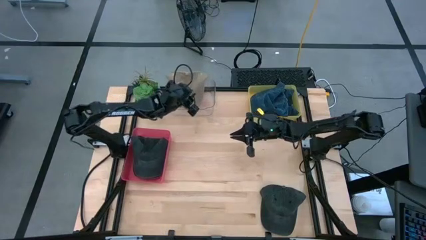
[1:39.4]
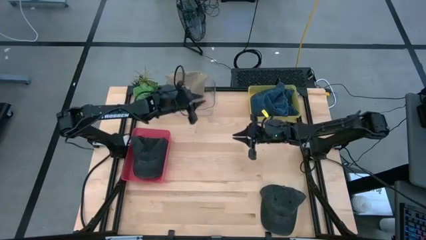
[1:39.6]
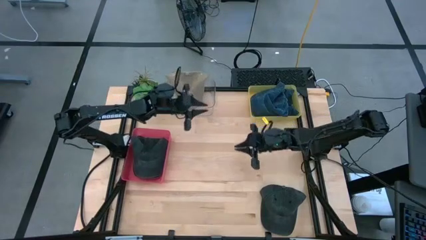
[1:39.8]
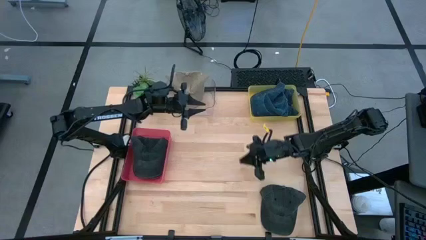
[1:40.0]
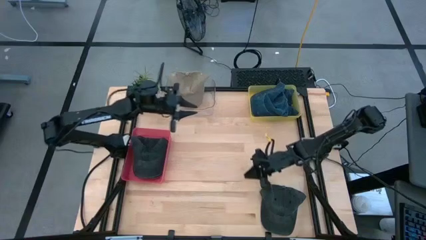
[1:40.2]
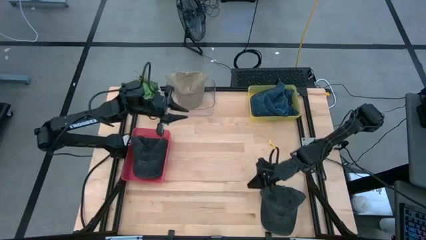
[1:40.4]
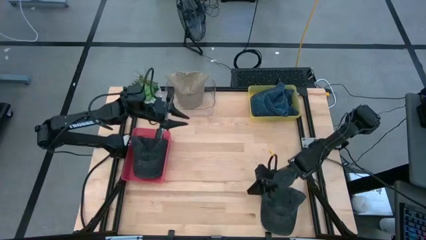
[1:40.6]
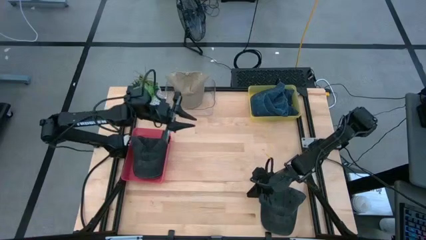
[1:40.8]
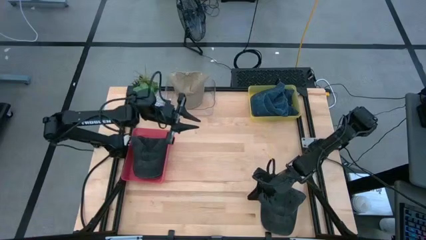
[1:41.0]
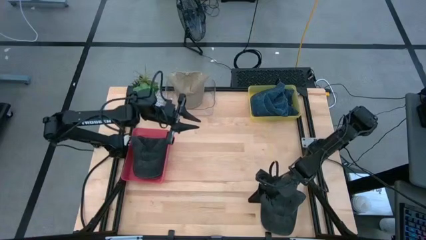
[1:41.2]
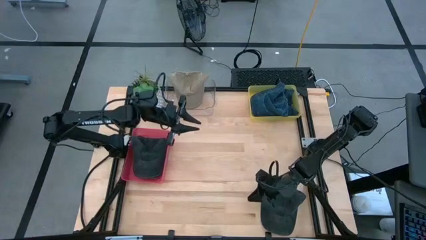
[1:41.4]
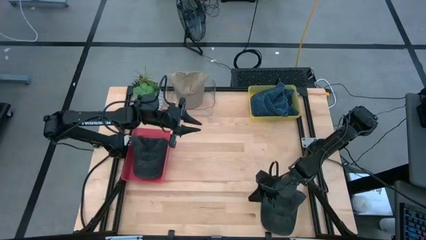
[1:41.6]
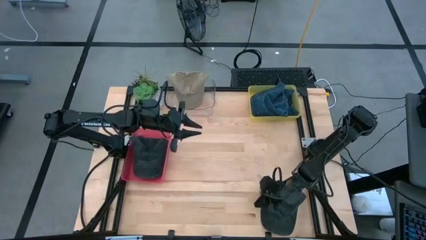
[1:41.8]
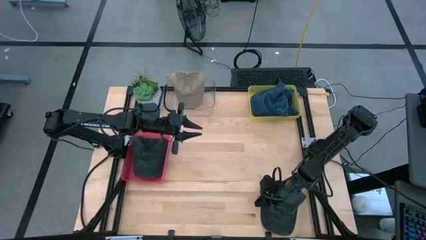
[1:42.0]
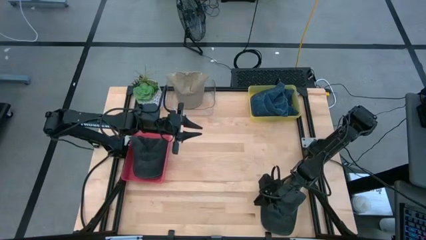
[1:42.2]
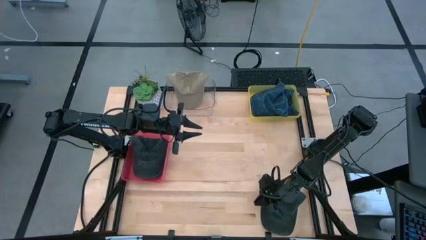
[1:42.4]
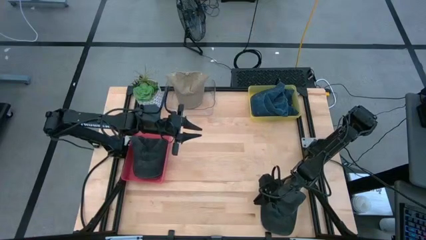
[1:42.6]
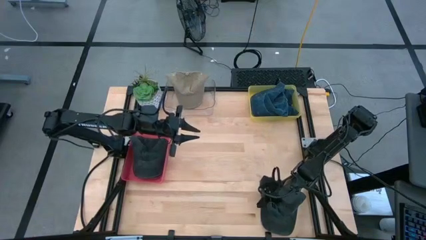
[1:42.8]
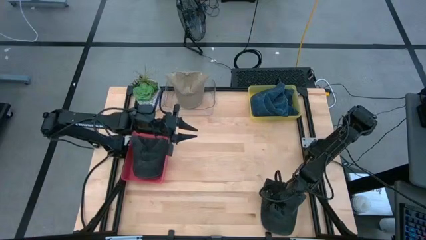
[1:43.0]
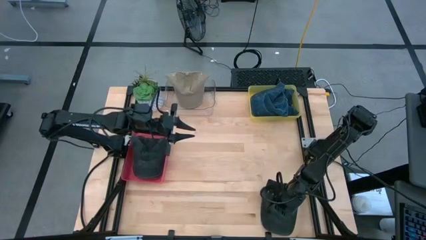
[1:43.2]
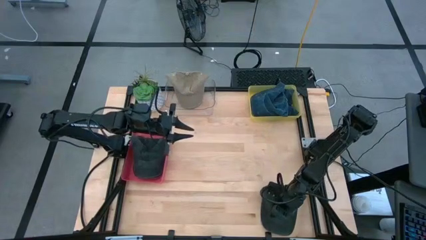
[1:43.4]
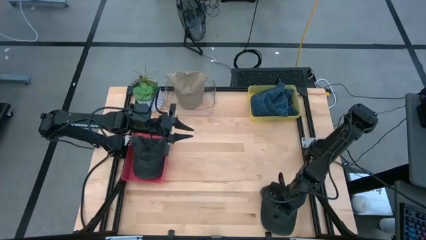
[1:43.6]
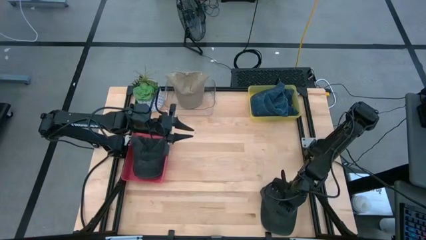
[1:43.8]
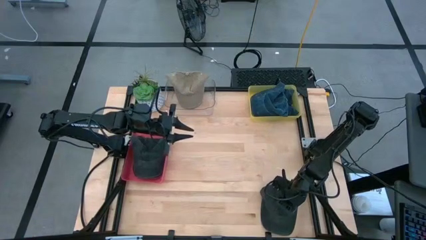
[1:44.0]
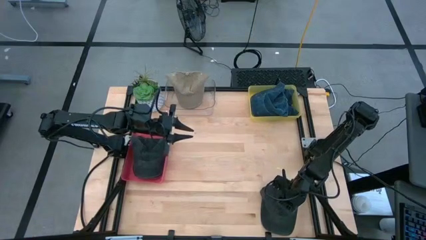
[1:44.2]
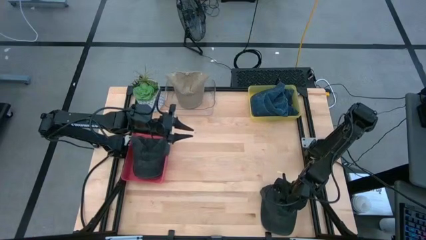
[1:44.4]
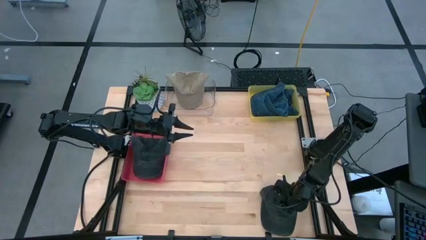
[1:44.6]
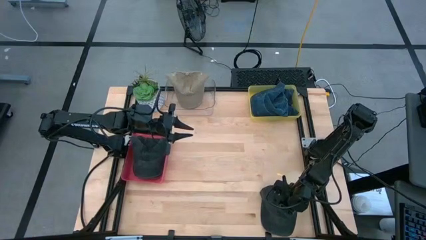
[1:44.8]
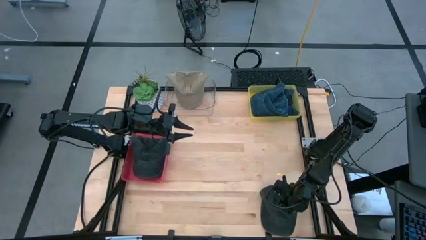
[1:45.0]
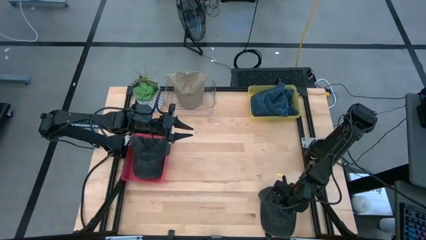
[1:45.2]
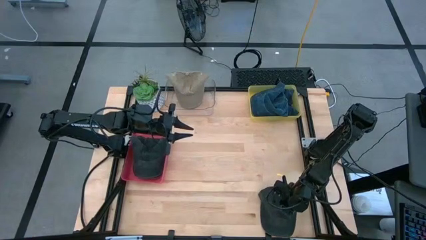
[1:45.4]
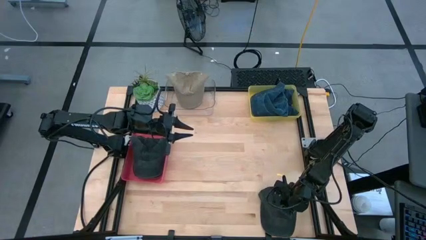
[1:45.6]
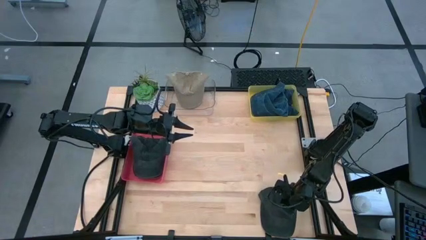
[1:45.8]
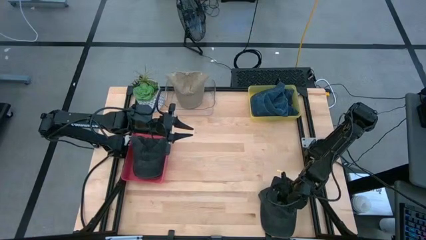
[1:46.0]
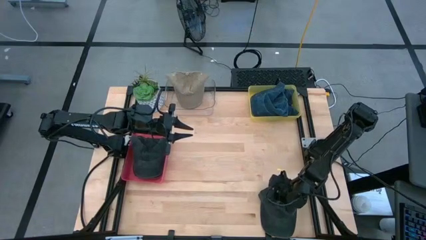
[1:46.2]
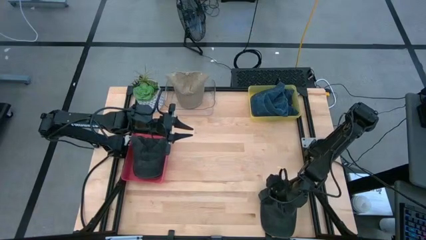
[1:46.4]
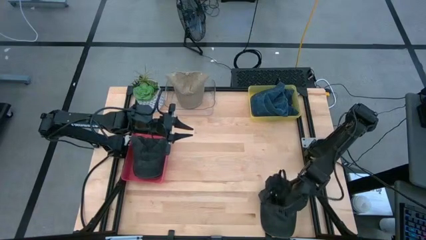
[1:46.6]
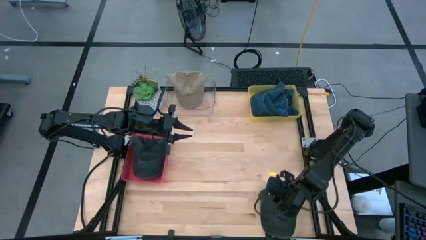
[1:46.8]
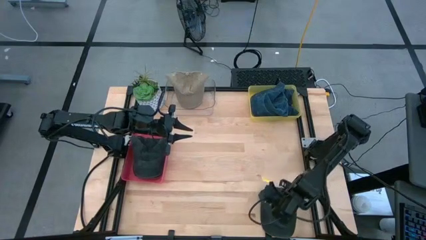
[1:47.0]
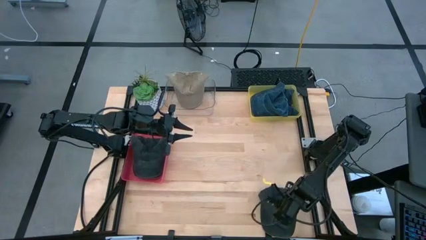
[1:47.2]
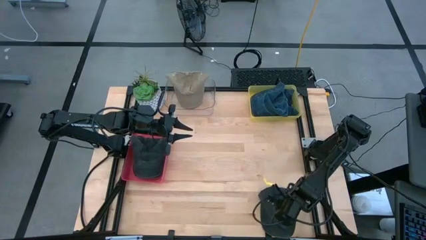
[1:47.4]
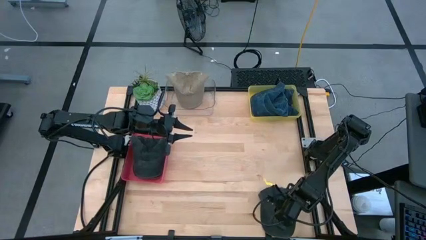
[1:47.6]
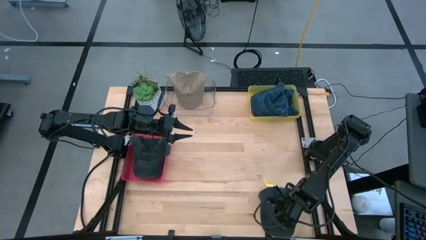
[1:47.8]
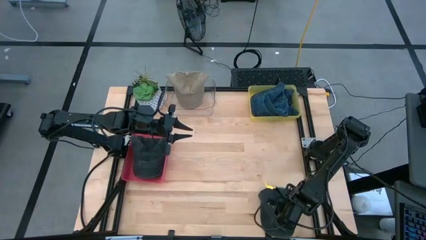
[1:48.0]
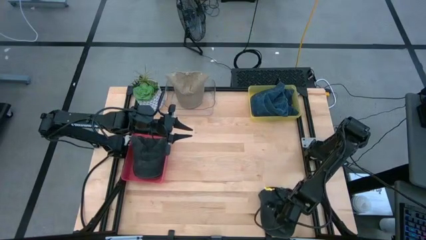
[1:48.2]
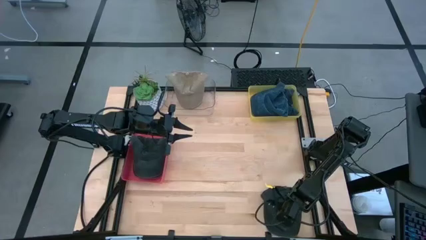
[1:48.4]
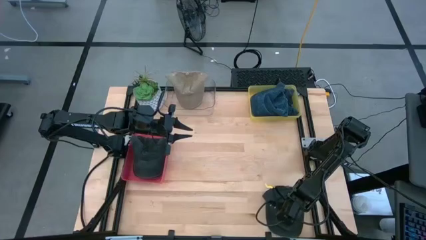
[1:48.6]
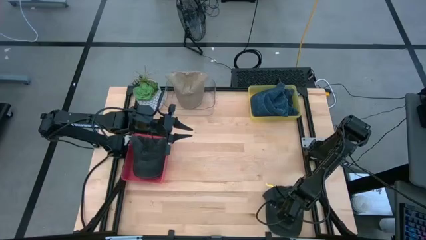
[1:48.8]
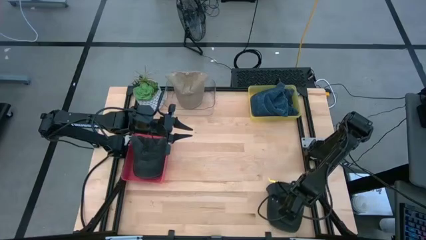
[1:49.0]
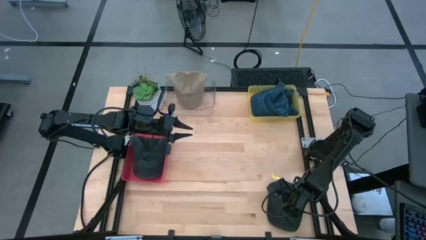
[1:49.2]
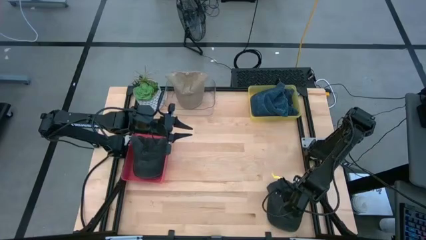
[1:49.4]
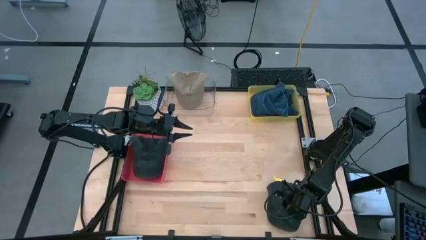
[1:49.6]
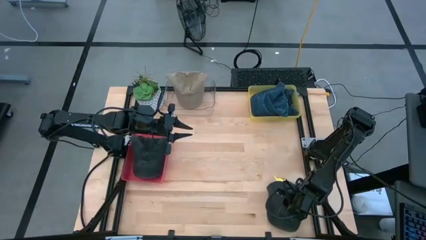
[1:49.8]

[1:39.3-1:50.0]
Task: Pick & Place hat
Put the black cap into the red bin

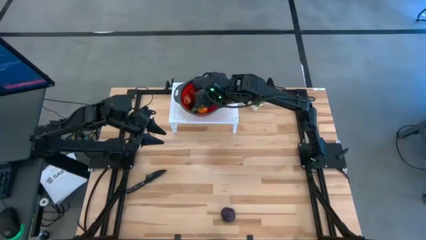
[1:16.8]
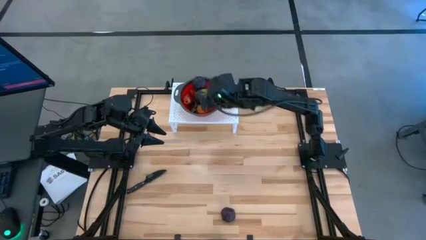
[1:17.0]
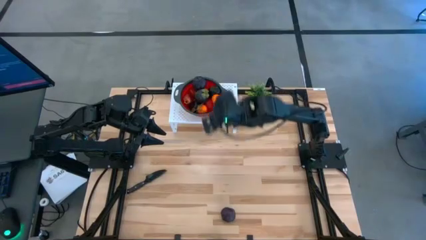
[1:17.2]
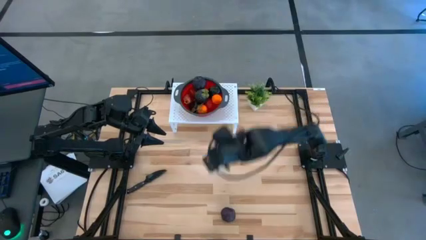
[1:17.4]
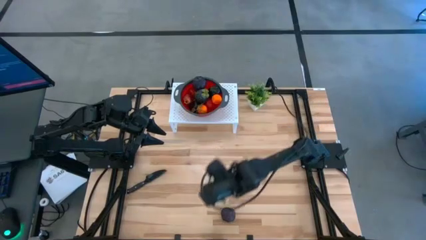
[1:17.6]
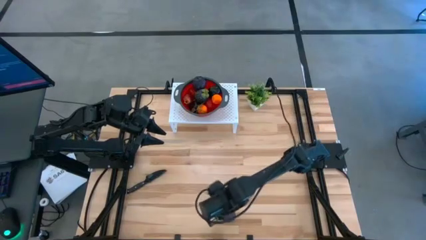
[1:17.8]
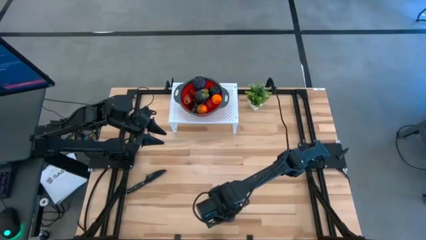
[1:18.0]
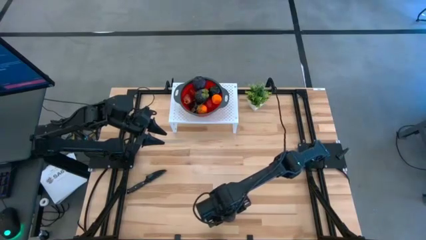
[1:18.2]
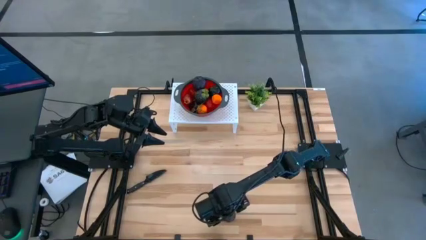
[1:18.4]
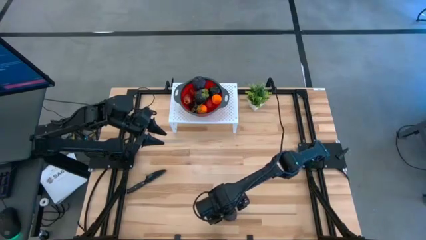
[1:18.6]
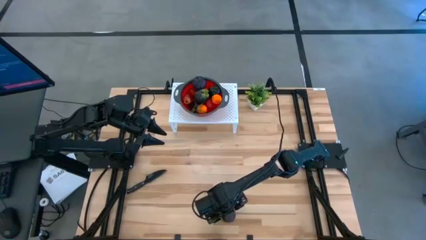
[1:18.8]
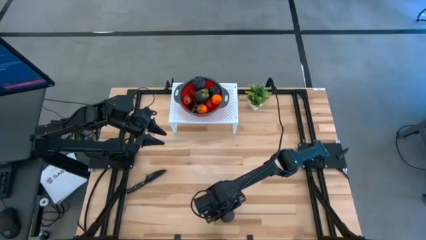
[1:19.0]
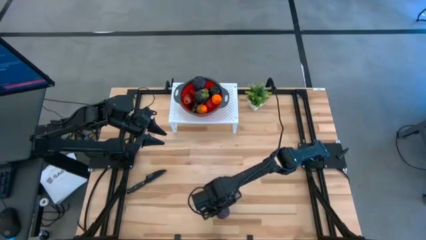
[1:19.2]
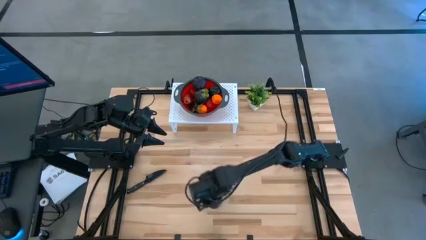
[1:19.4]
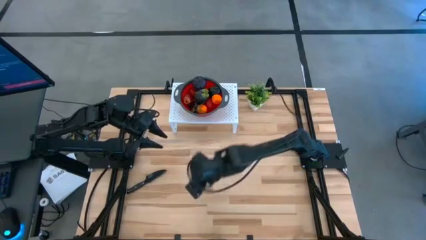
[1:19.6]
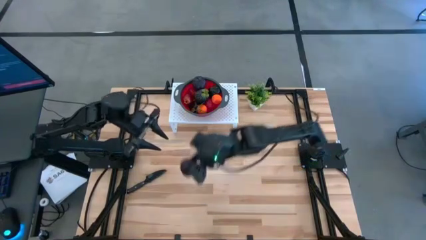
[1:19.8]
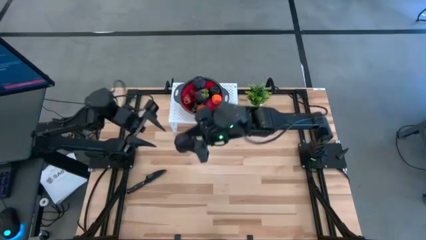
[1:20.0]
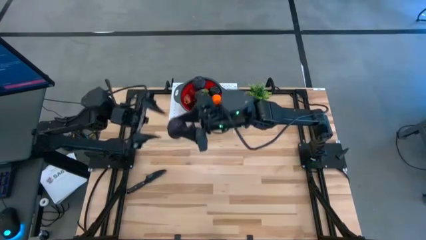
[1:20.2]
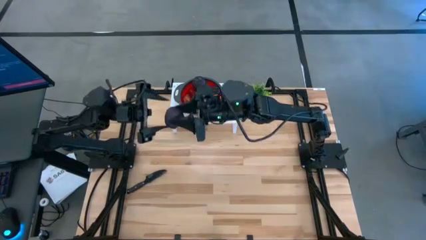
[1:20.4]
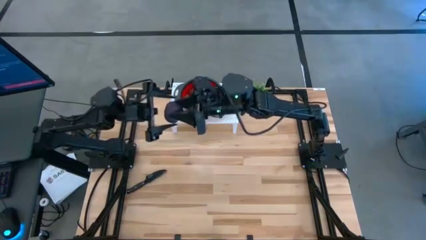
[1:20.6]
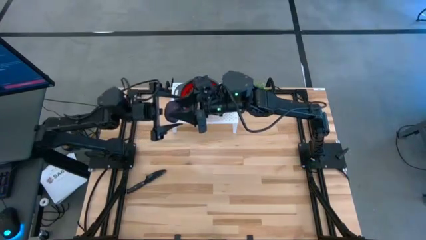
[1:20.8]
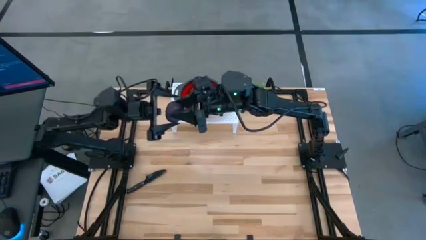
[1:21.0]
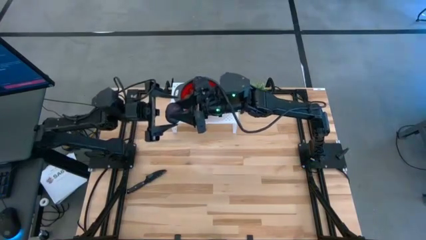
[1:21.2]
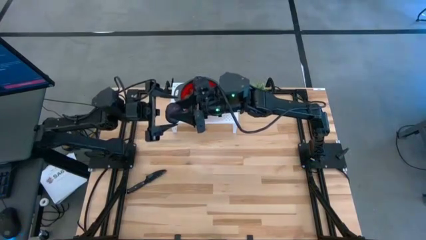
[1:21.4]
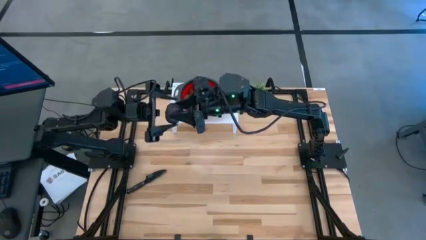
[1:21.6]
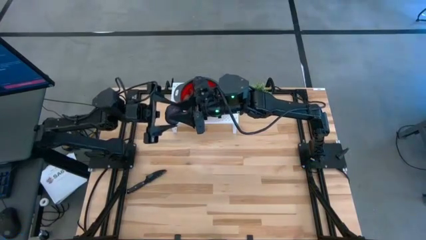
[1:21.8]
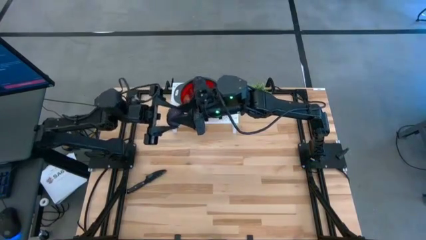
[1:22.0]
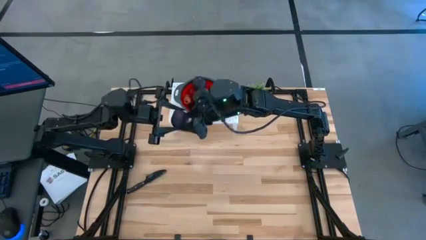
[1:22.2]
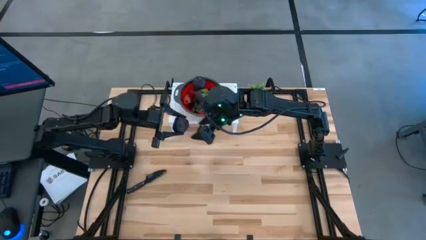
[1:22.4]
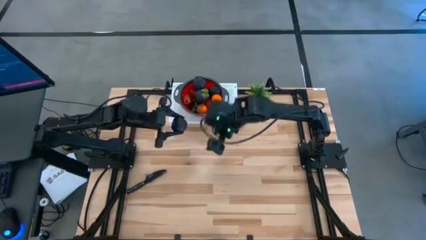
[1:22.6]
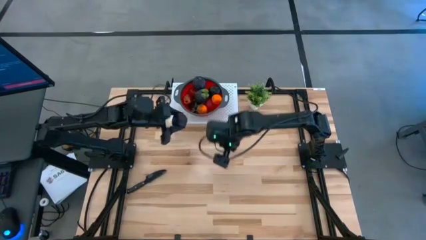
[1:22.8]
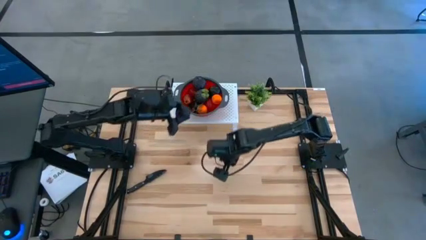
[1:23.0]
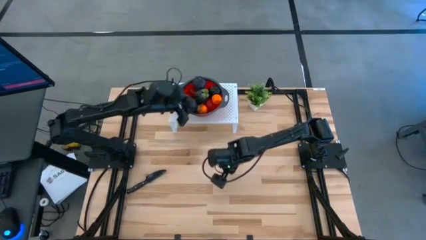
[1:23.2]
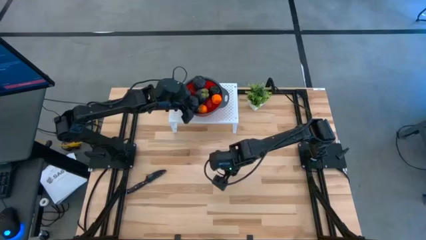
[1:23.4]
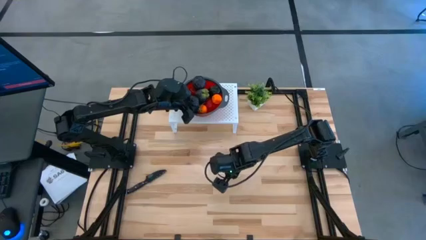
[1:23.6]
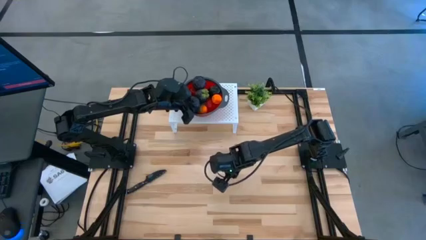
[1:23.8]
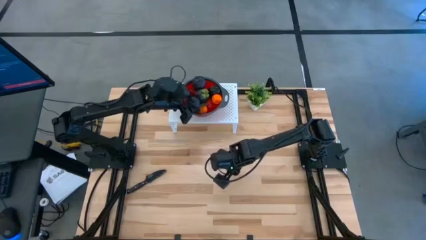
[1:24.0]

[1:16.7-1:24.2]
Task: Pick & Place Fruit
Put the purple plum into the red strainer bowl on the shelf
